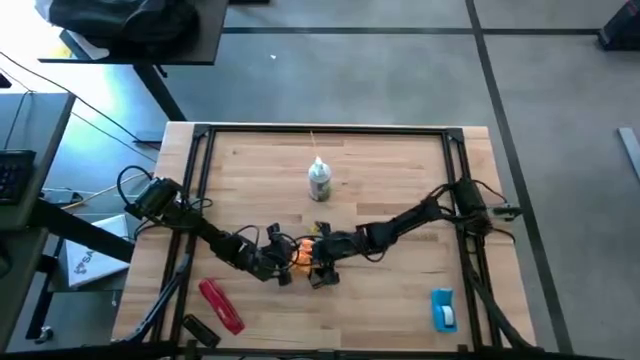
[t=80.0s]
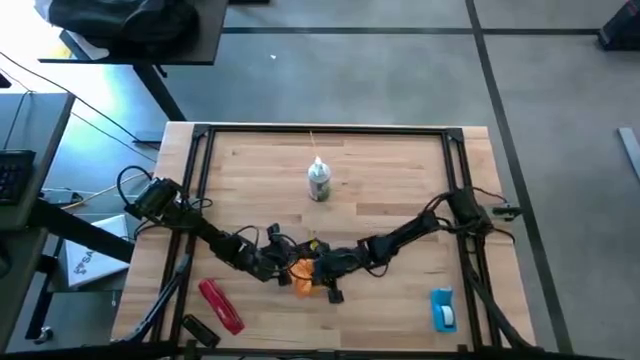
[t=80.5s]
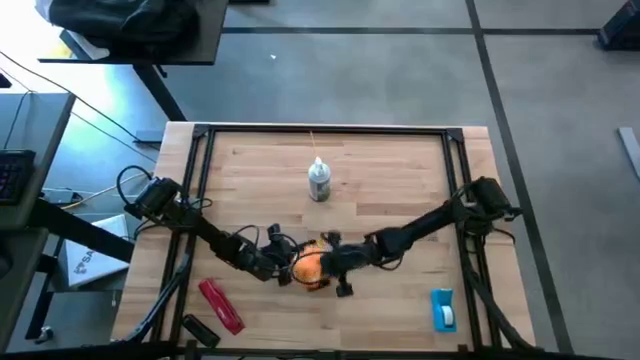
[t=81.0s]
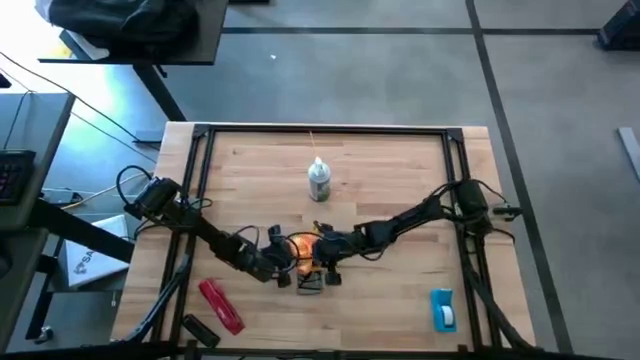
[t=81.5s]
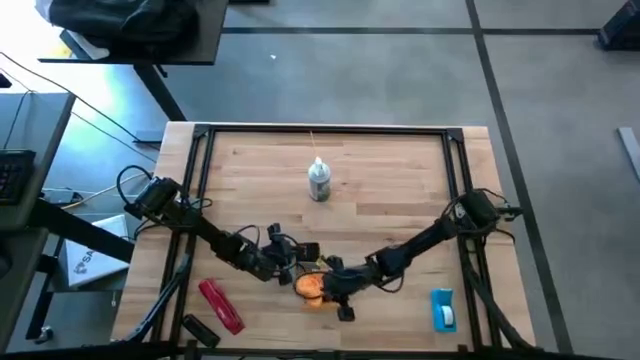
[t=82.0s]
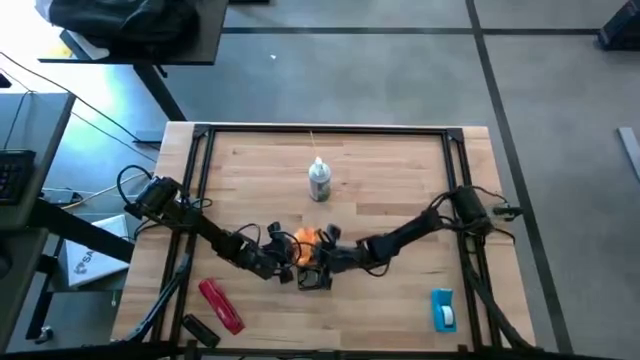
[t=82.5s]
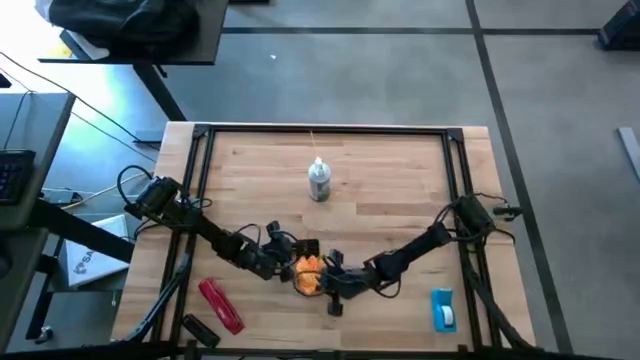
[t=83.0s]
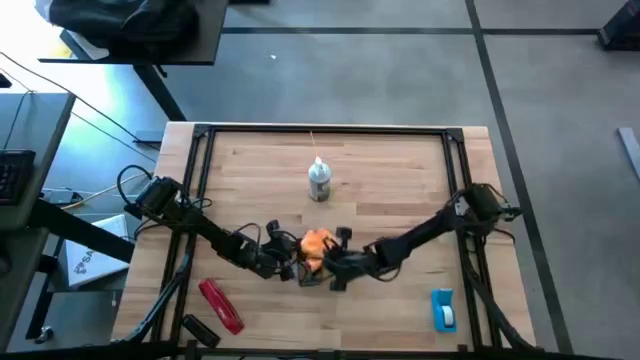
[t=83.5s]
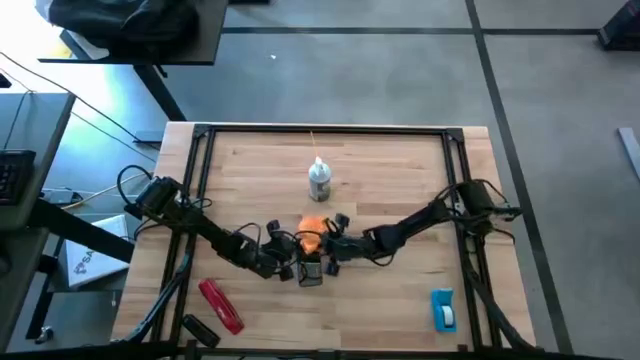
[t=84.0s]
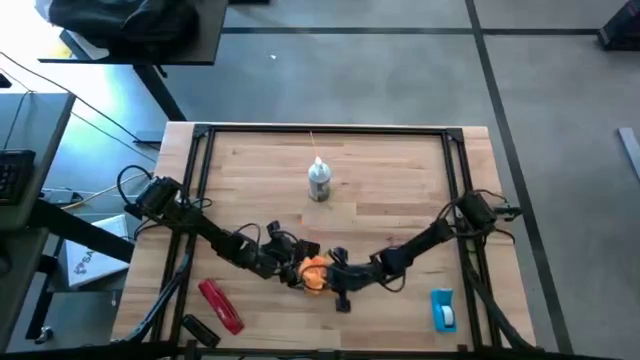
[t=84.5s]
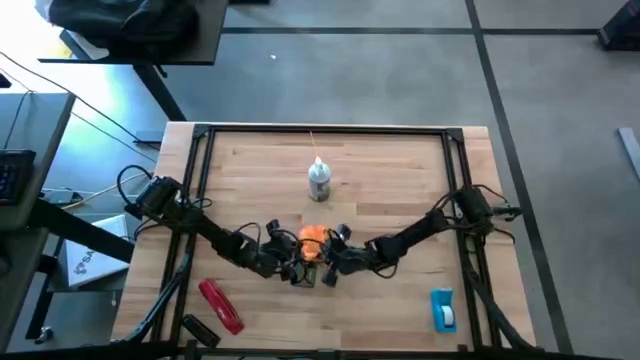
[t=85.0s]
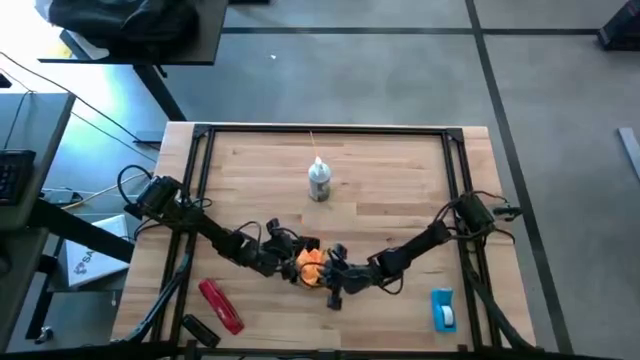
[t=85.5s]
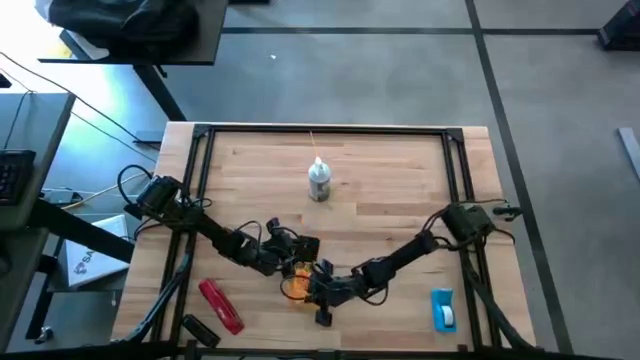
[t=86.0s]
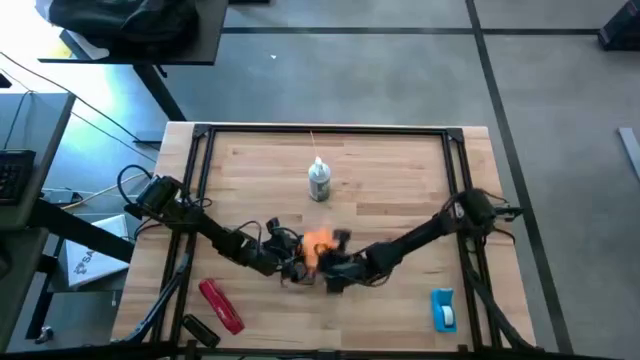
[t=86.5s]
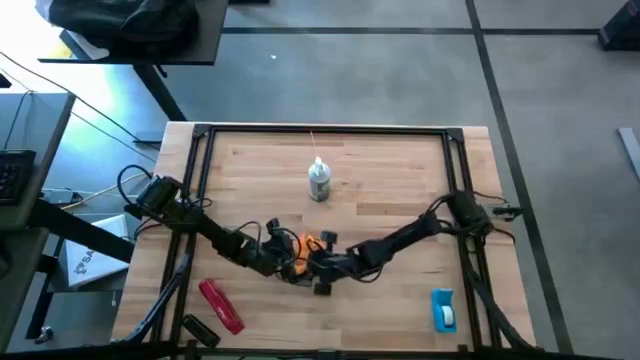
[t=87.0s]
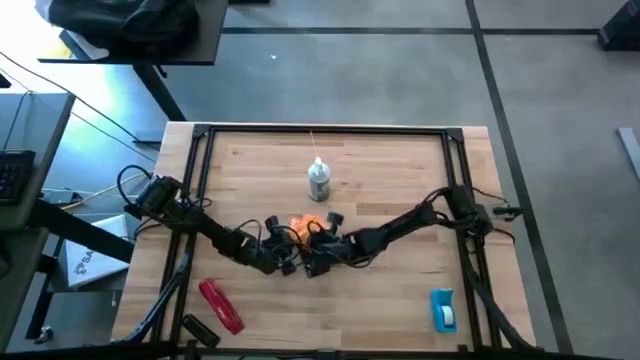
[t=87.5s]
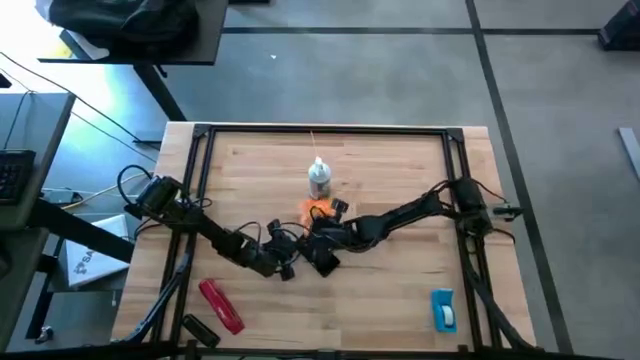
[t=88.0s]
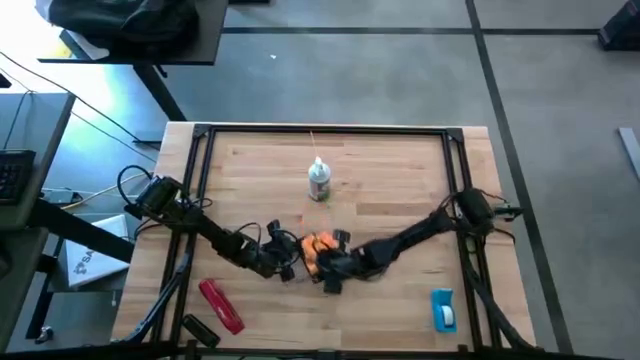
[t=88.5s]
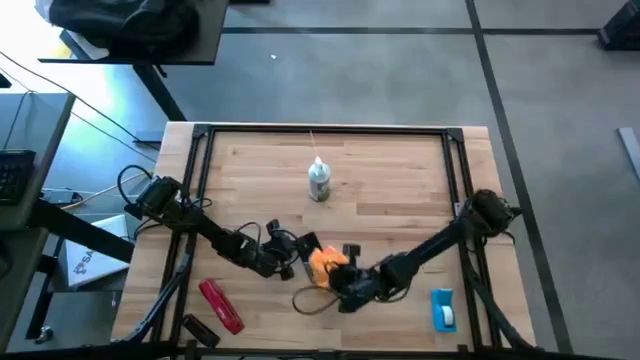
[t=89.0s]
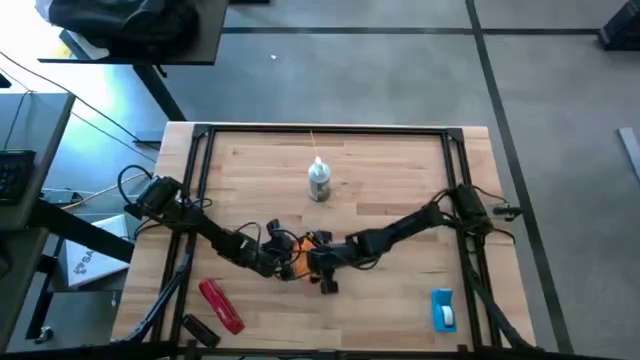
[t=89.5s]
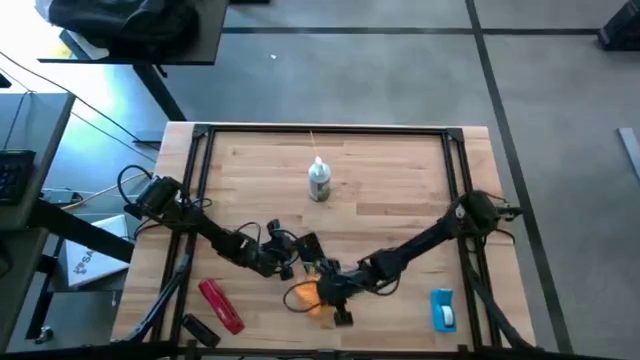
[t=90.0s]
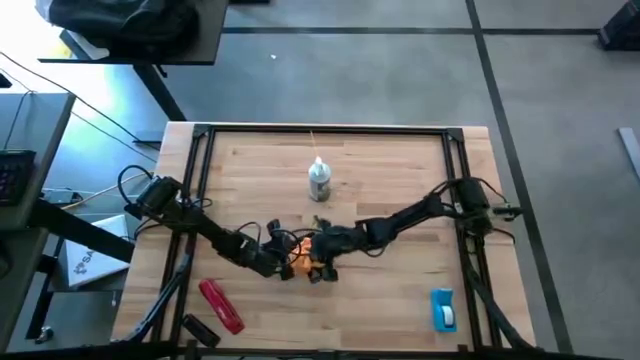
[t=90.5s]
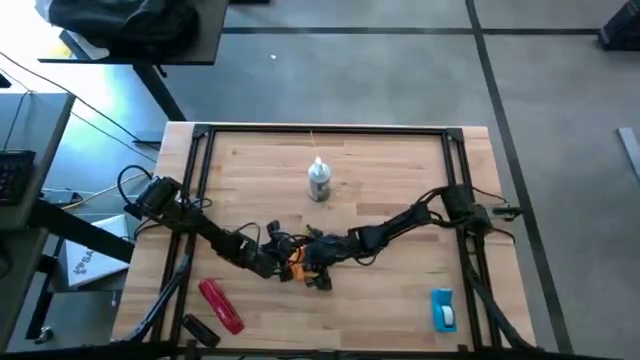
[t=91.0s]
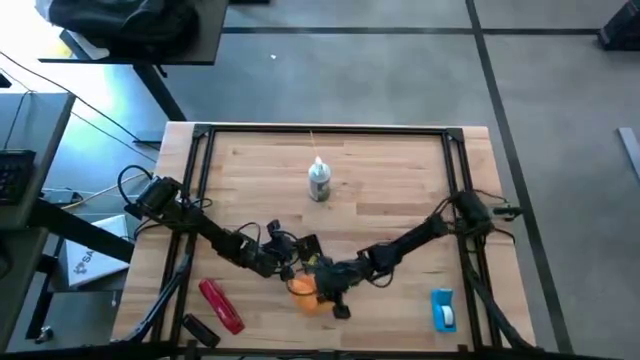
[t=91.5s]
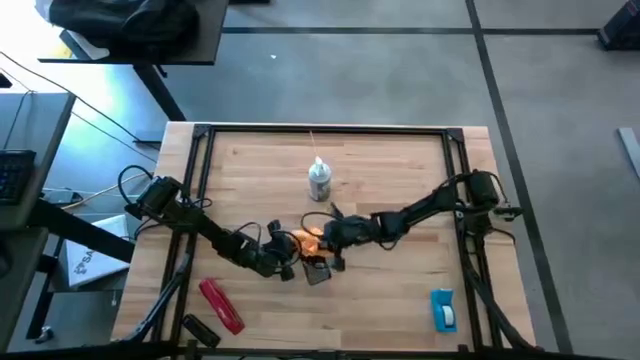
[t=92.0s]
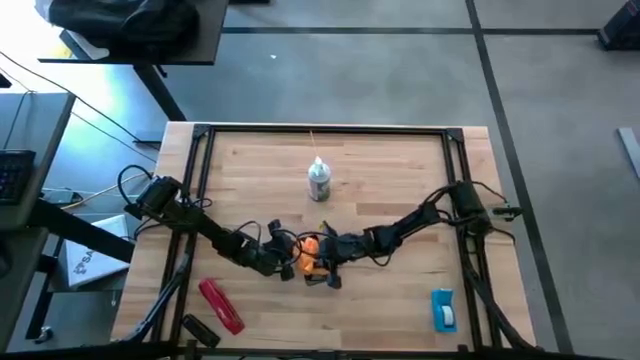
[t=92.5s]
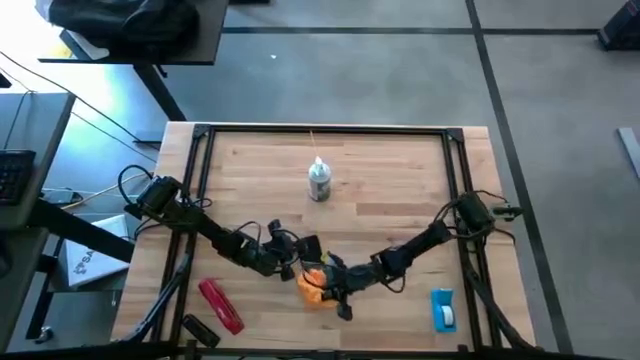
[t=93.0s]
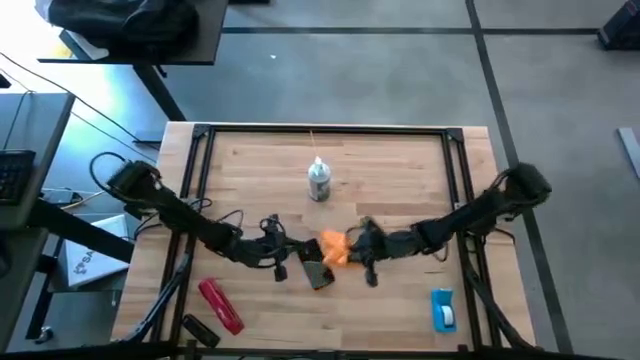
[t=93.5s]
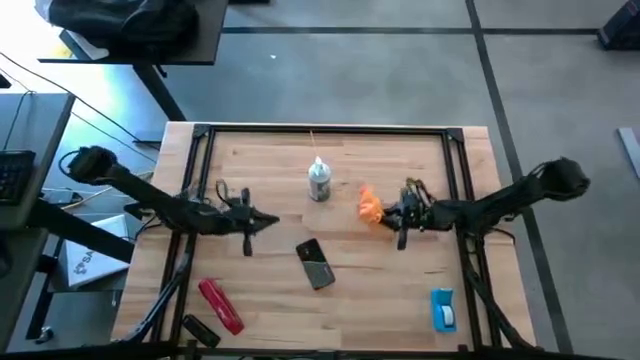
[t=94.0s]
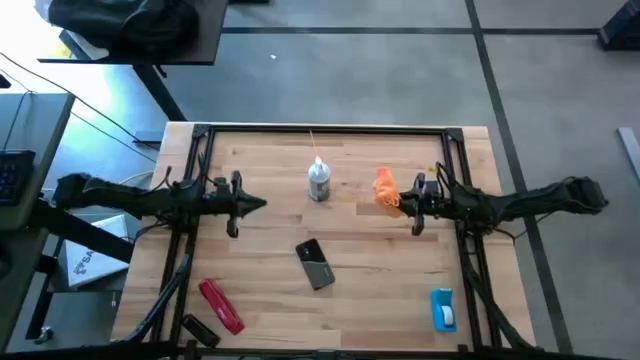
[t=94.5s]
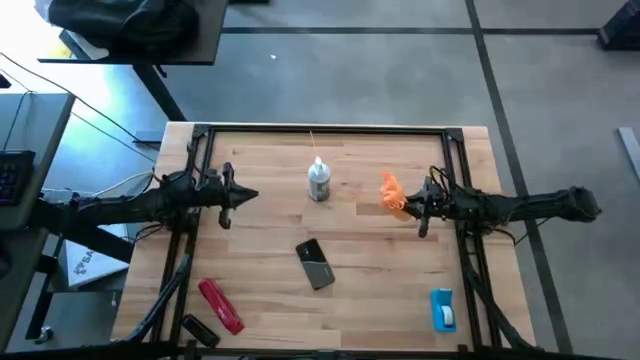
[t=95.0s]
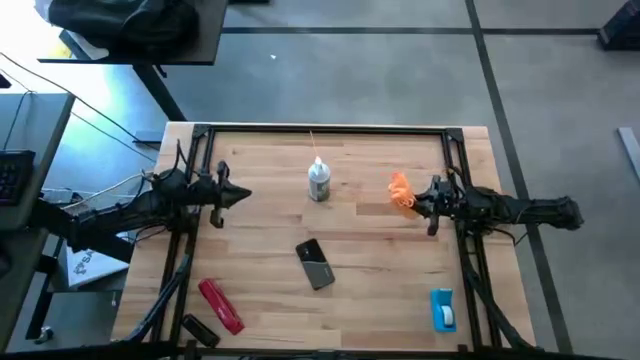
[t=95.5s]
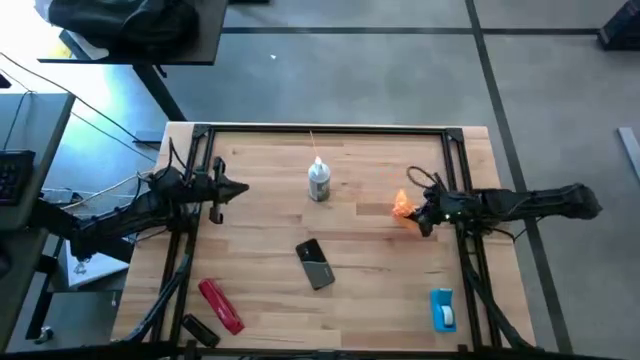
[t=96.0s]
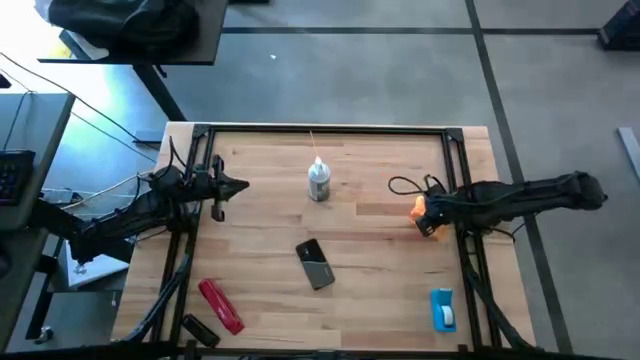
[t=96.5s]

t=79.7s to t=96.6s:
Task: Apply microfiber cloth
Wipe the front and back of the black cellphone using the orange microfiber cloth

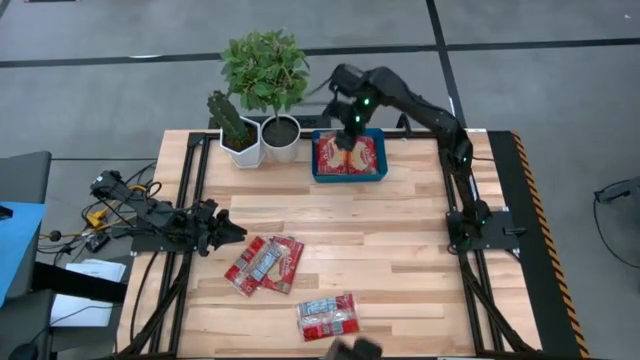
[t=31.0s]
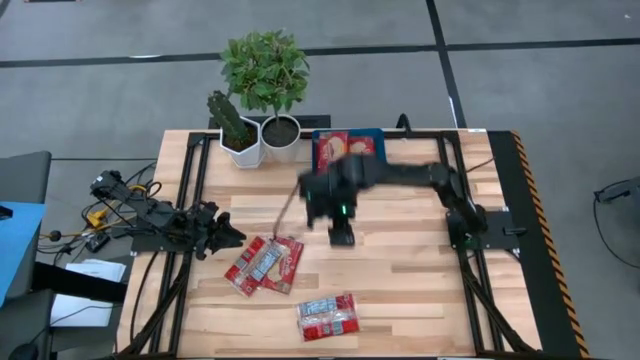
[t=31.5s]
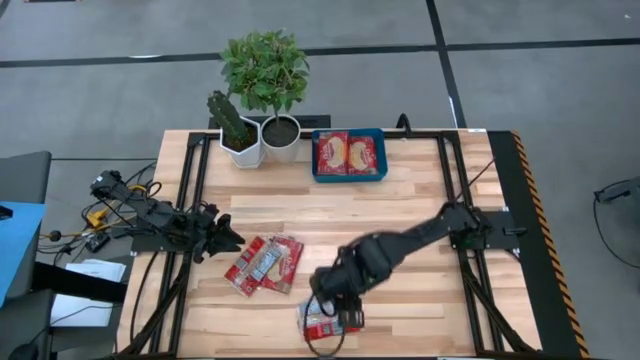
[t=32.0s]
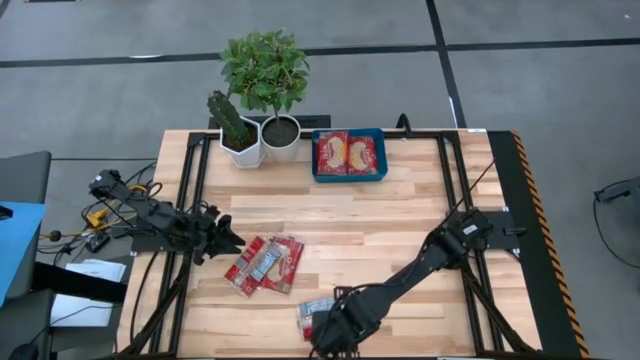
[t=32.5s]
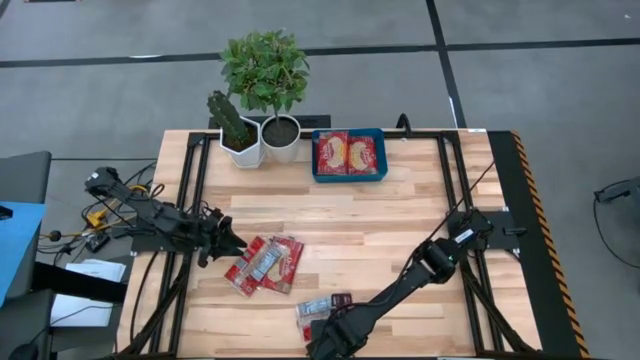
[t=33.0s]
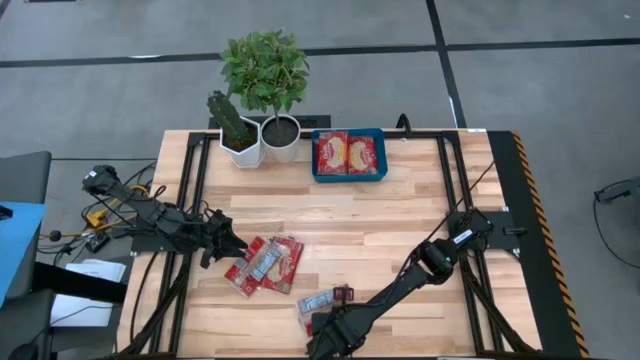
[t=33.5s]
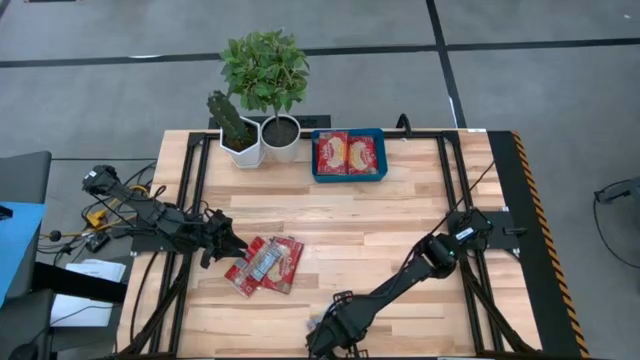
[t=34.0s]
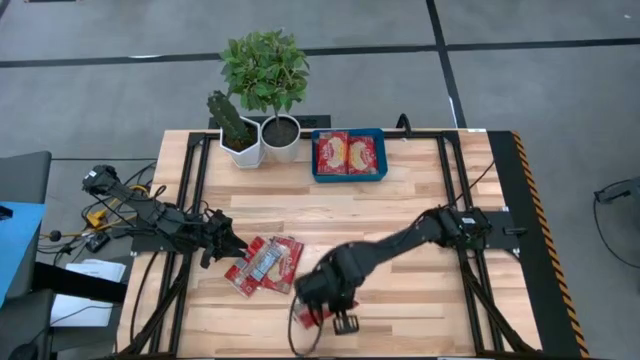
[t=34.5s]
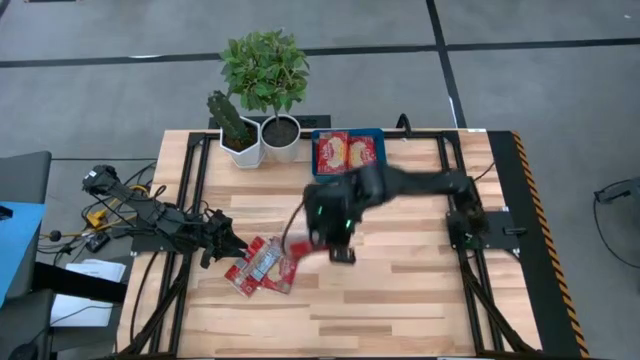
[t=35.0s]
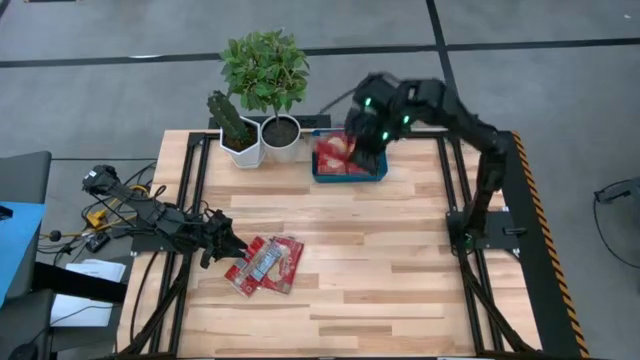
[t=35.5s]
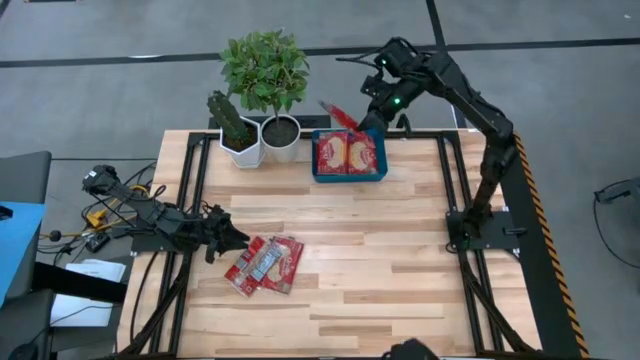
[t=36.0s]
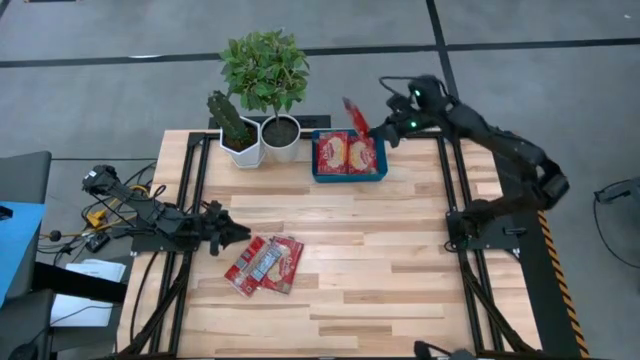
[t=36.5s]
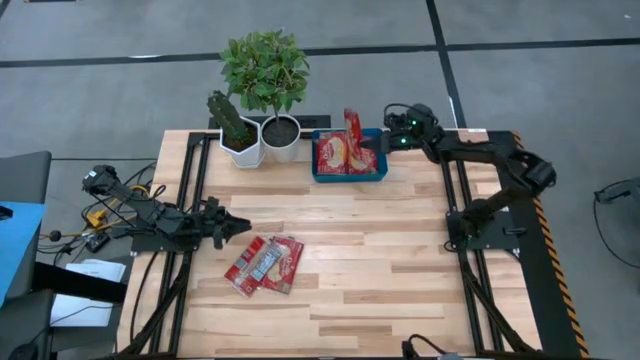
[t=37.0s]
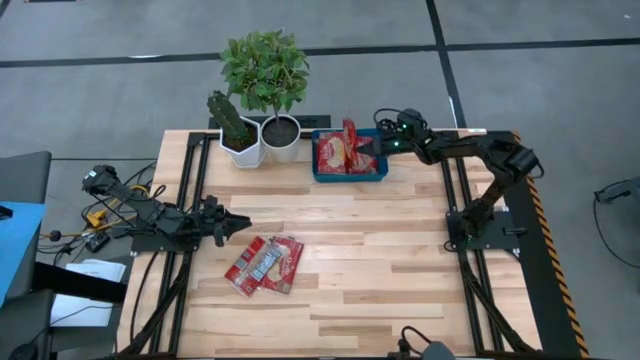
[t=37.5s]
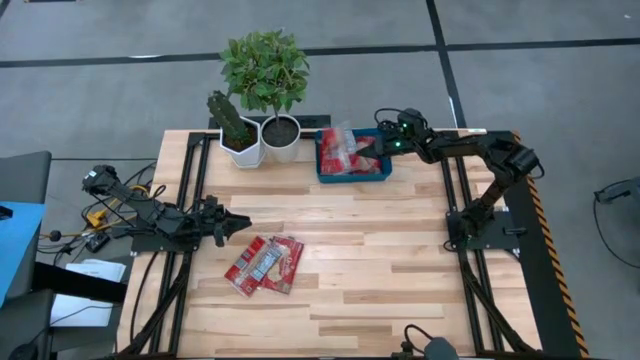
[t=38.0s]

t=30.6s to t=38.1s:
Task: Sort popcorn bags into baskets
Put the red popcorn bag into the blue container
